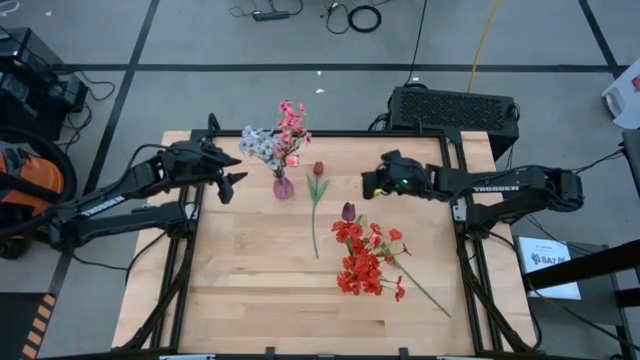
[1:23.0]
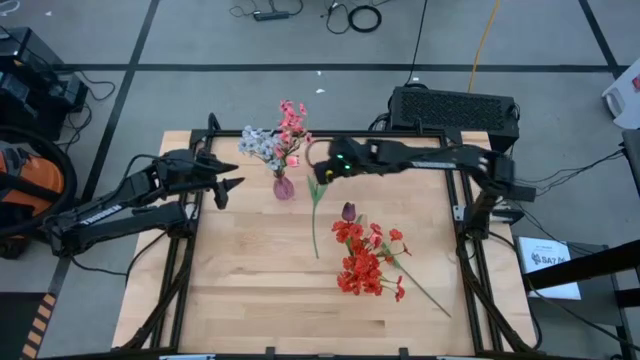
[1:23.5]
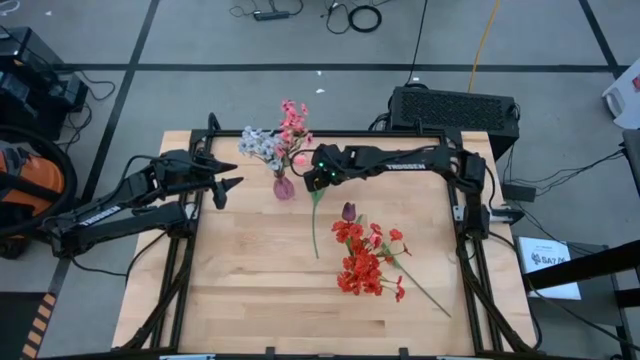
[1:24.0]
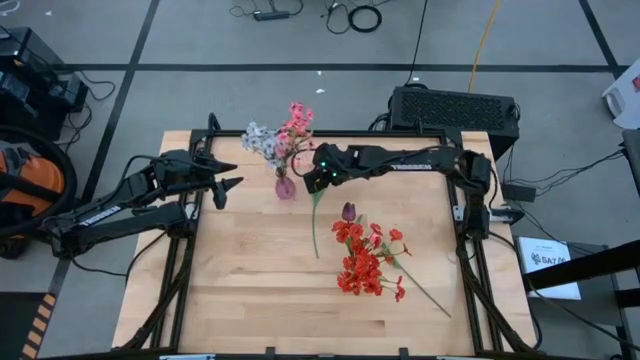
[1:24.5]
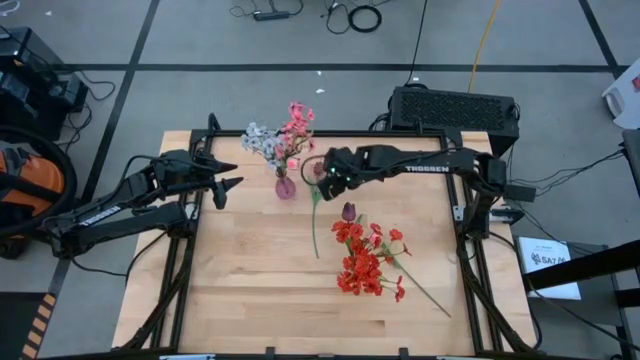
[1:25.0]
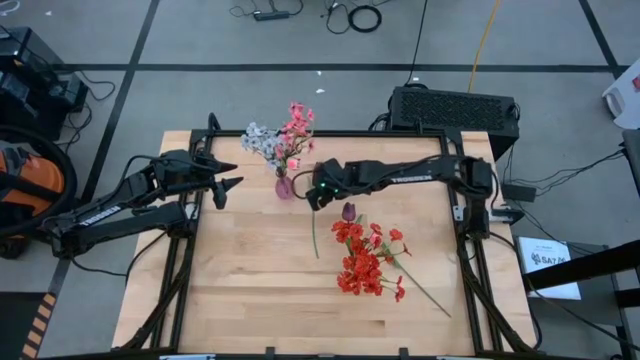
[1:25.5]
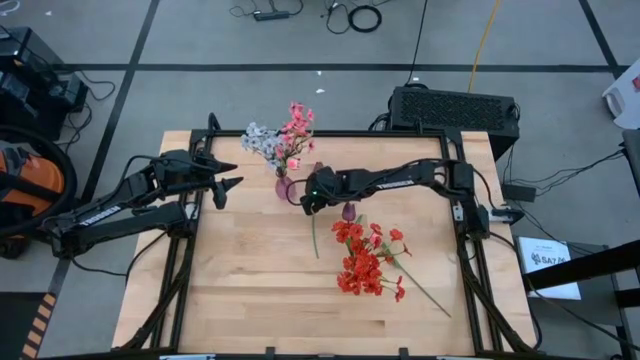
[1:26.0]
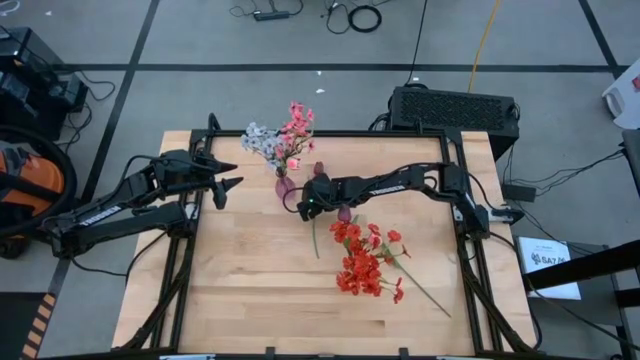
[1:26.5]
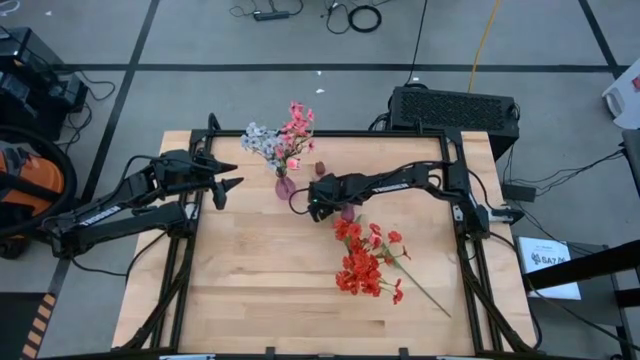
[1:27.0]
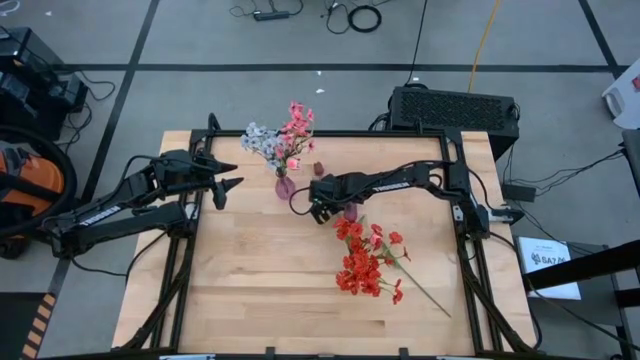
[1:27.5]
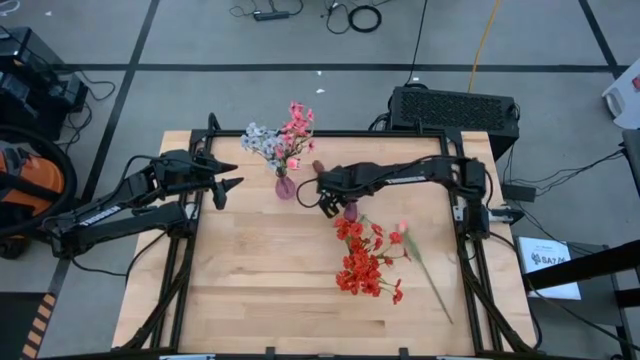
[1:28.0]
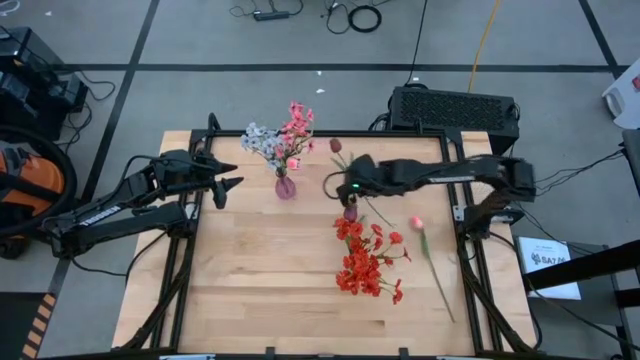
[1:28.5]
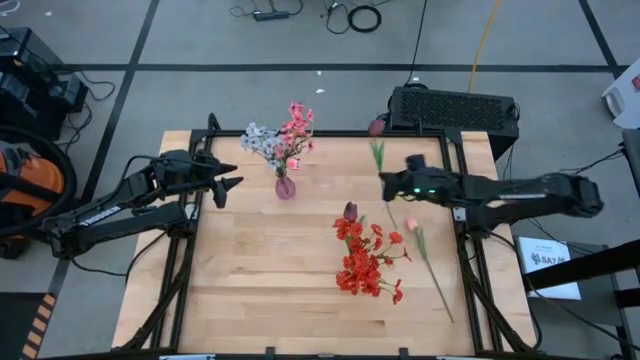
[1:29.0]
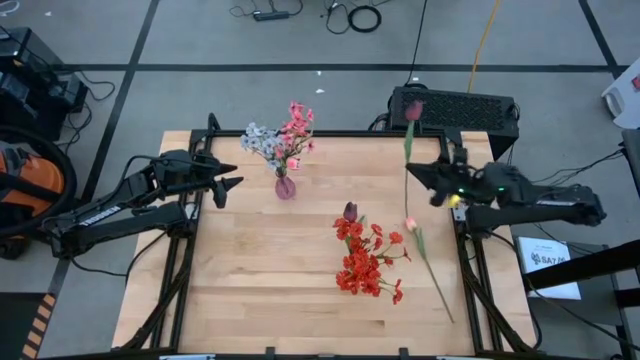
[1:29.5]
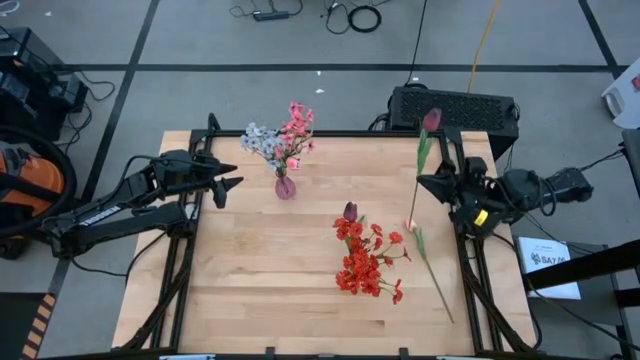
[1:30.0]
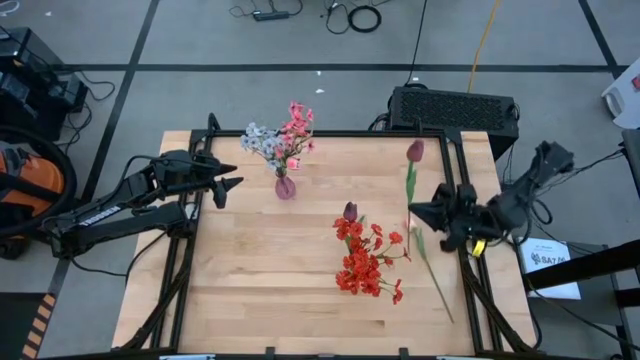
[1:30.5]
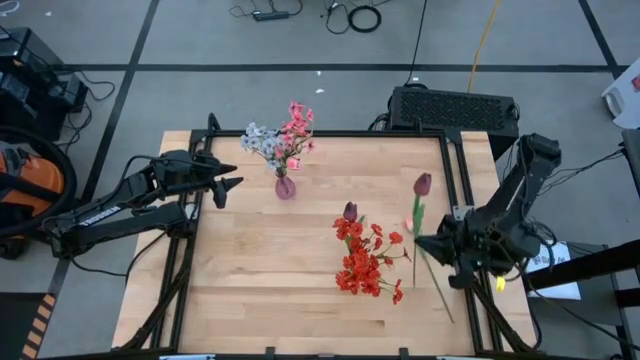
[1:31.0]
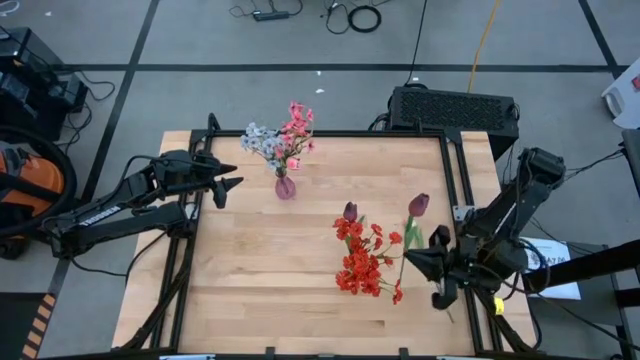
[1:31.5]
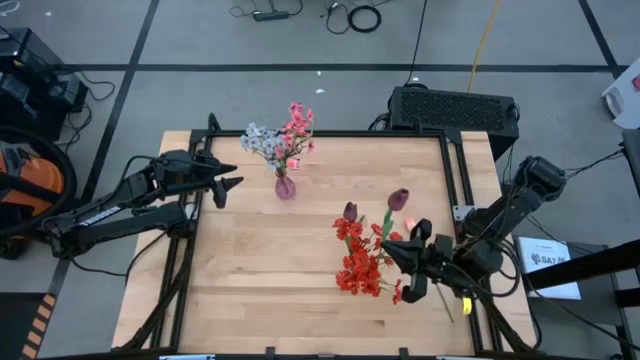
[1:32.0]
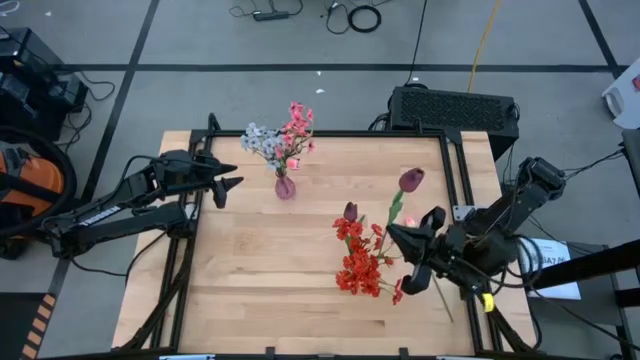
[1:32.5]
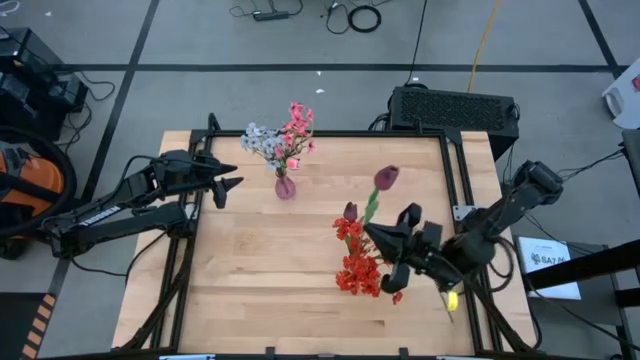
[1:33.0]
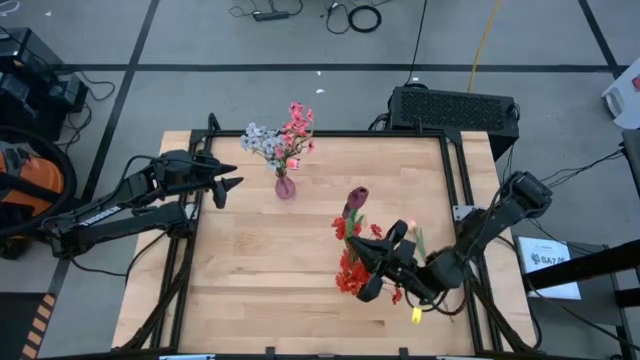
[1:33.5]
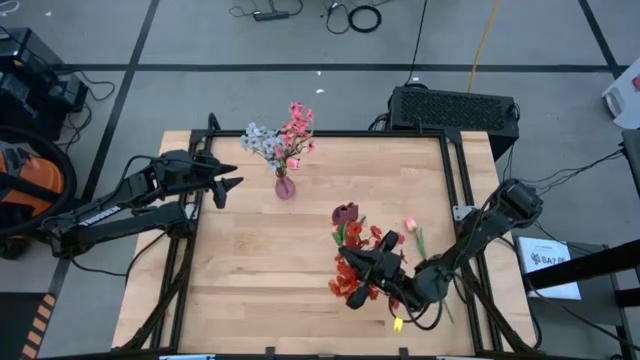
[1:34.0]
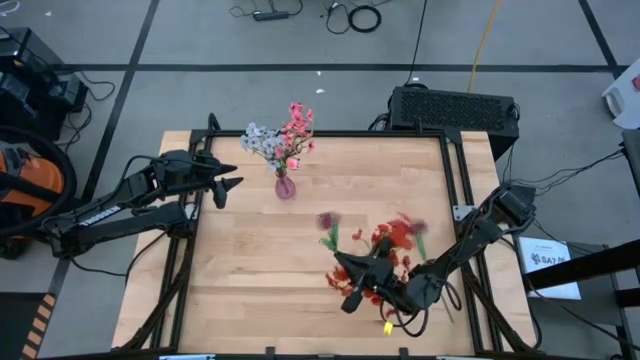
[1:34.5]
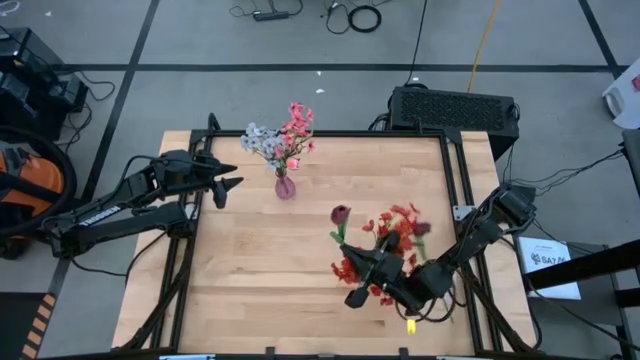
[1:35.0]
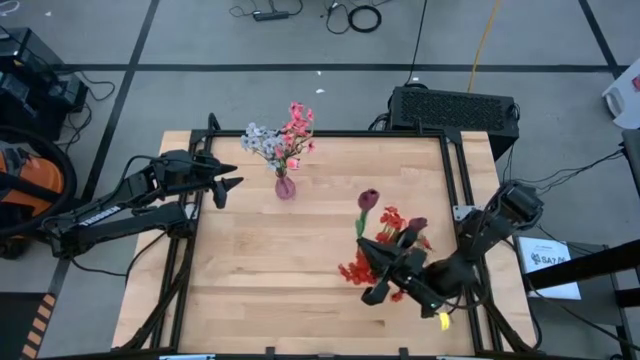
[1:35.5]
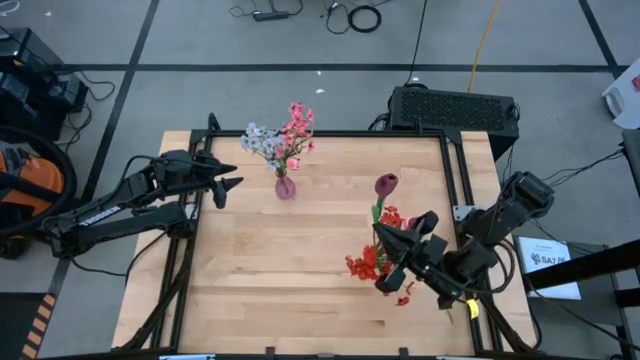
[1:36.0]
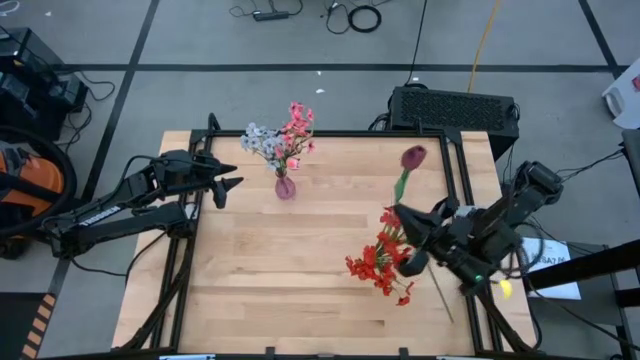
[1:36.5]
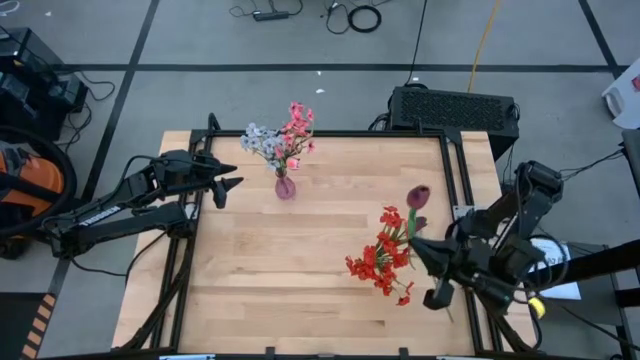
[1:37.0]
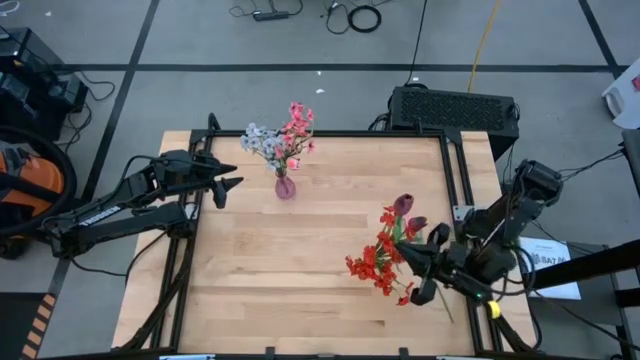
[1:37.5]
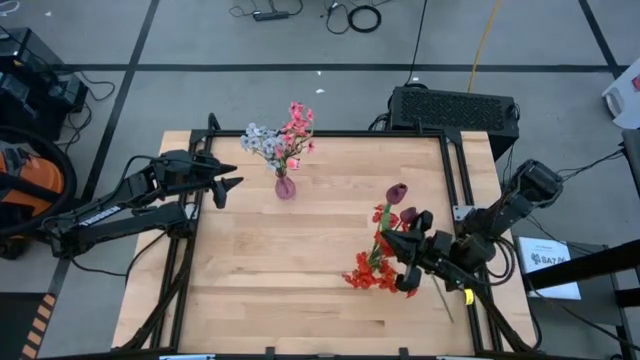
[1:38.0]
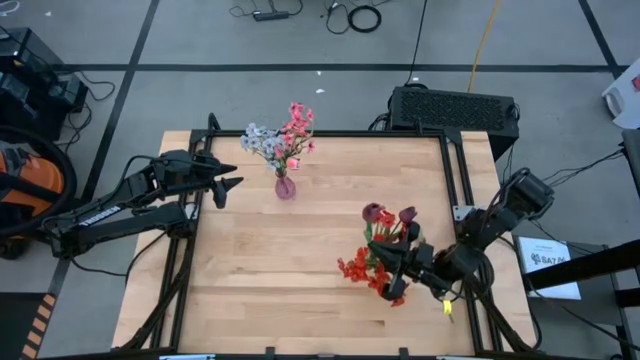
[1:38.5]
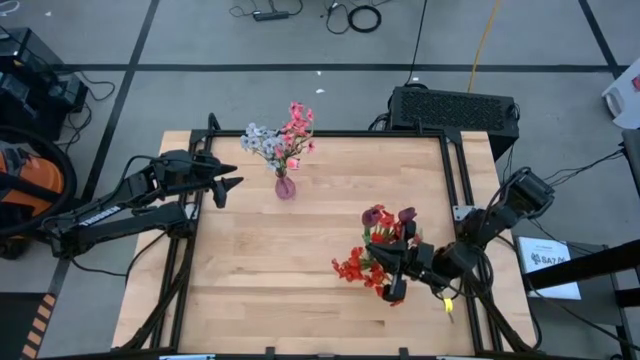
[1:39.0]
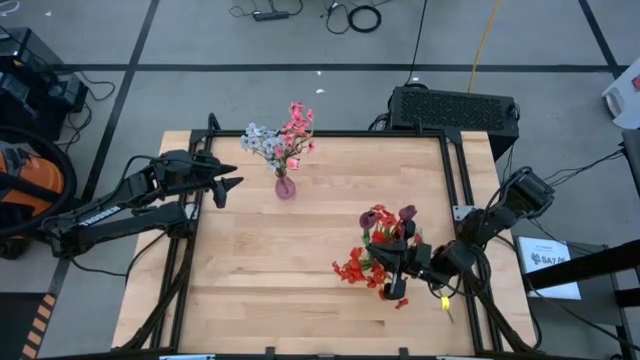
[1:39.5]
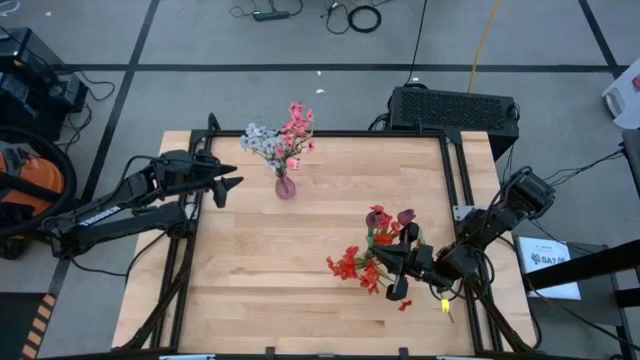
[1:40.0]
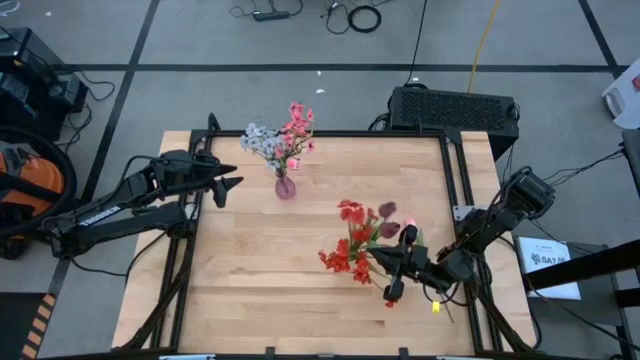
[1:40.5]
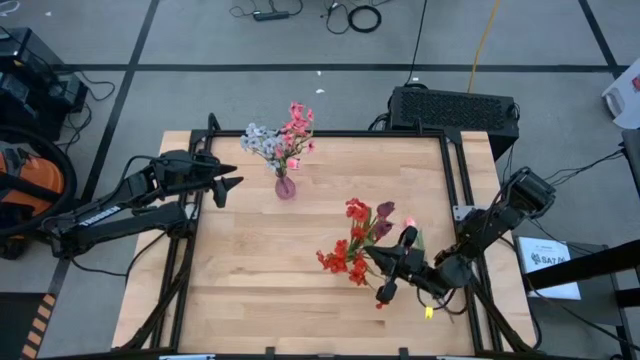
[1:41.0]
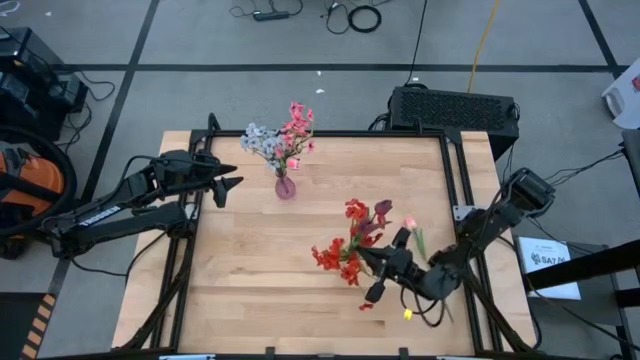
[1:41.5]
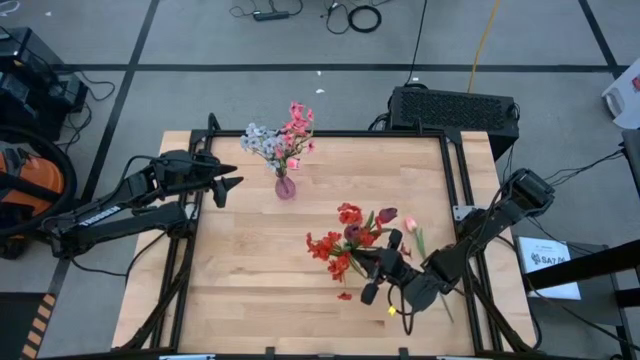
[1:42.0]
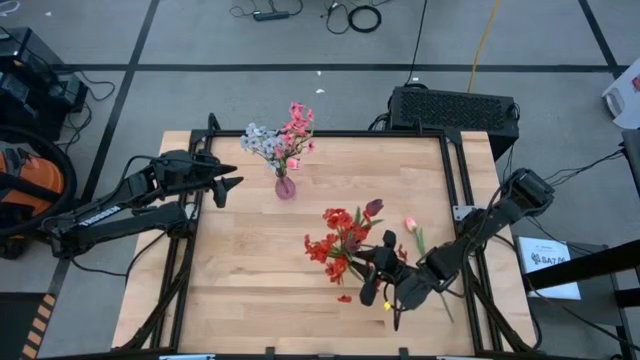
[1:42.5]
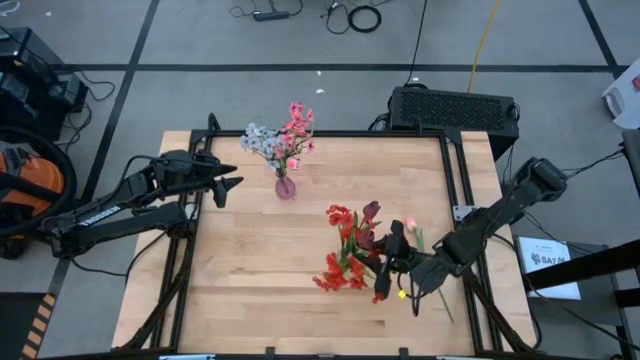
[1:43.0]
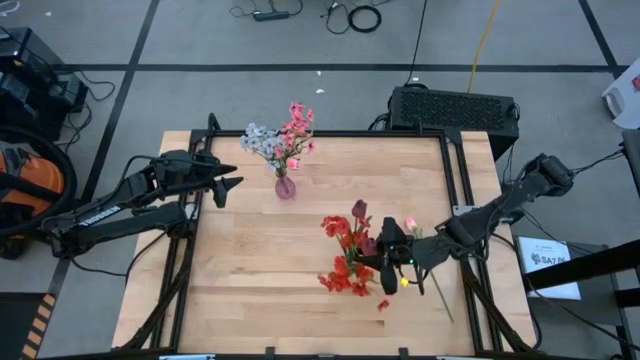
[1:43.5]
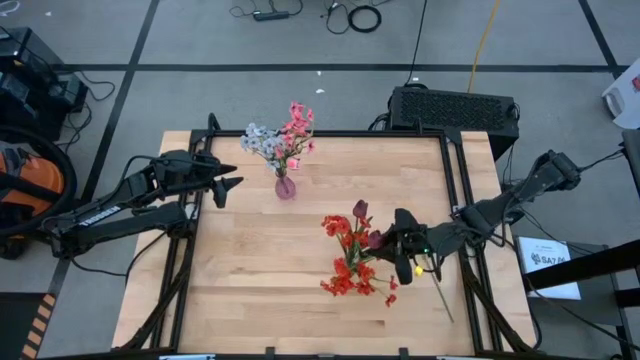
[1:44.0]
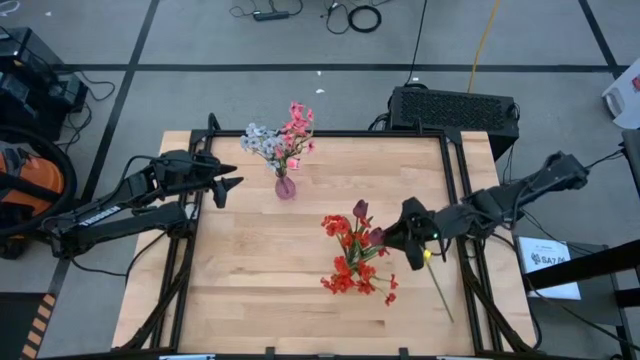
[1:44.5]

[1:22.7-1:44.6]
Task: Sort flowers into vase by color
Put the dark red tulip into the transparent flower vase
